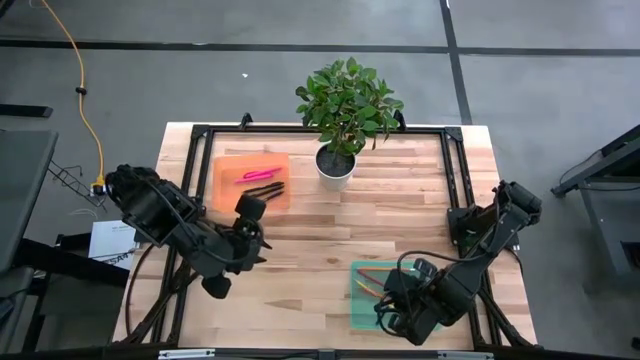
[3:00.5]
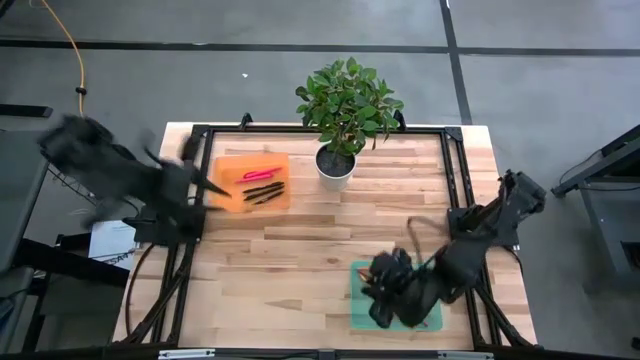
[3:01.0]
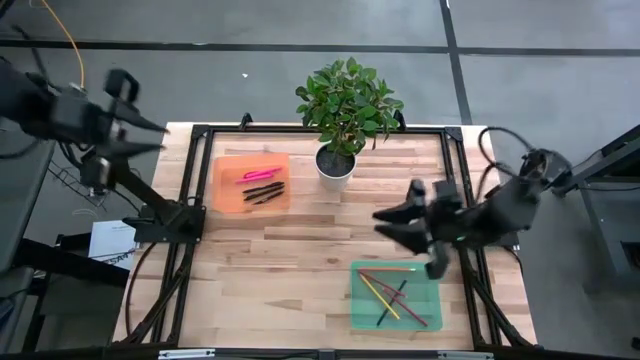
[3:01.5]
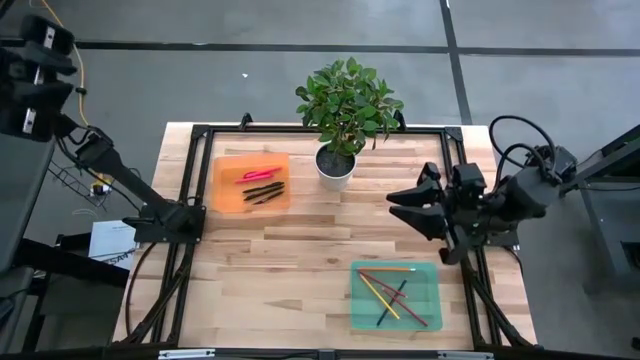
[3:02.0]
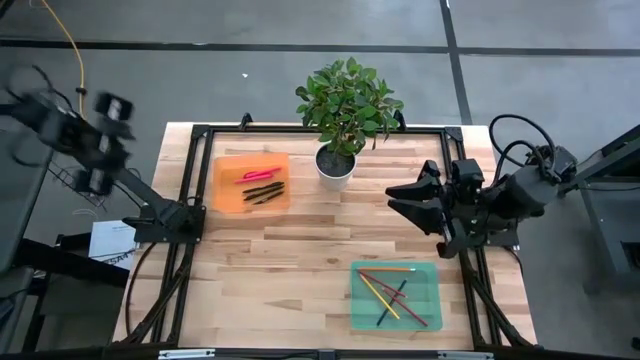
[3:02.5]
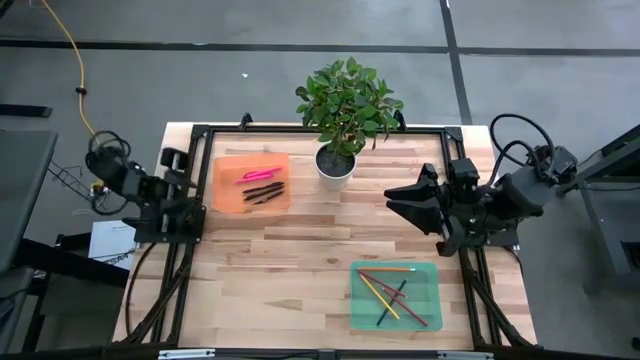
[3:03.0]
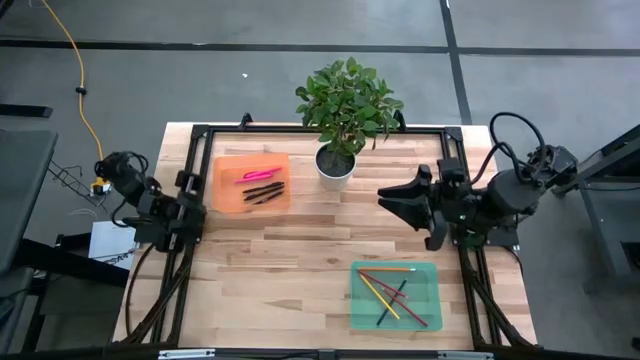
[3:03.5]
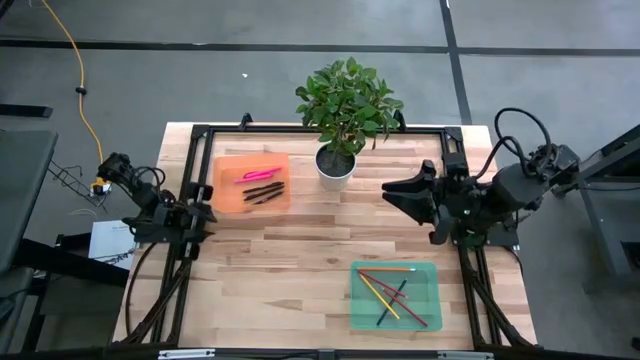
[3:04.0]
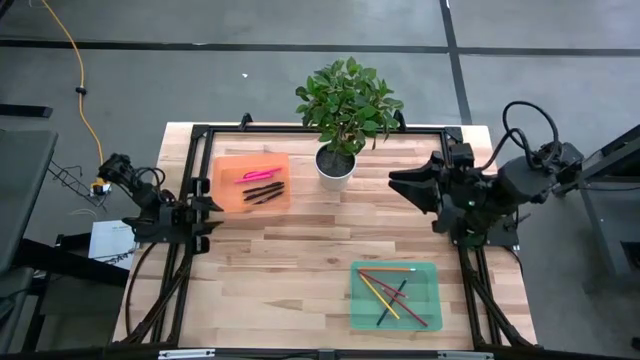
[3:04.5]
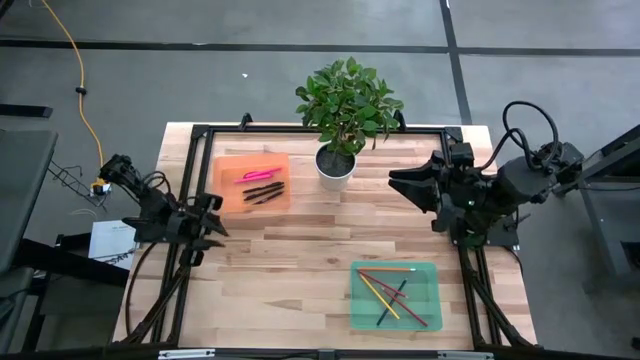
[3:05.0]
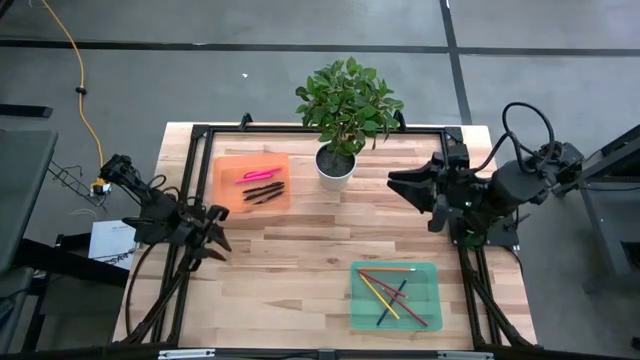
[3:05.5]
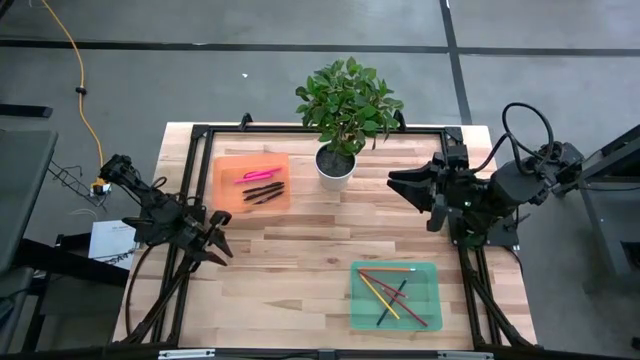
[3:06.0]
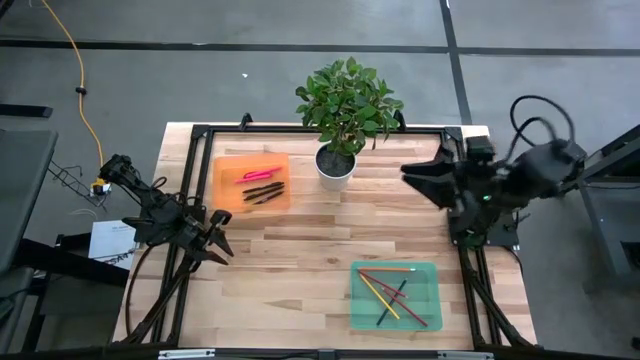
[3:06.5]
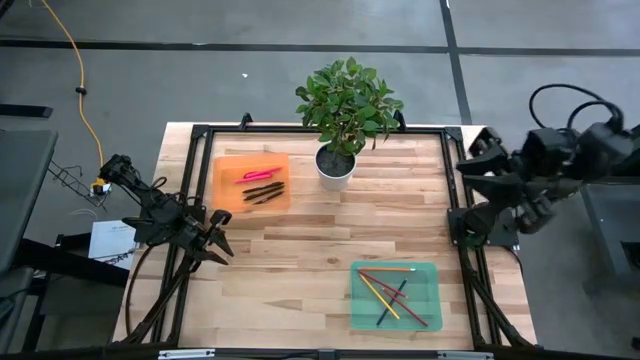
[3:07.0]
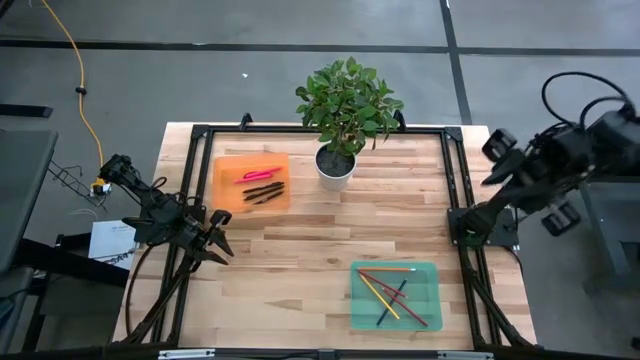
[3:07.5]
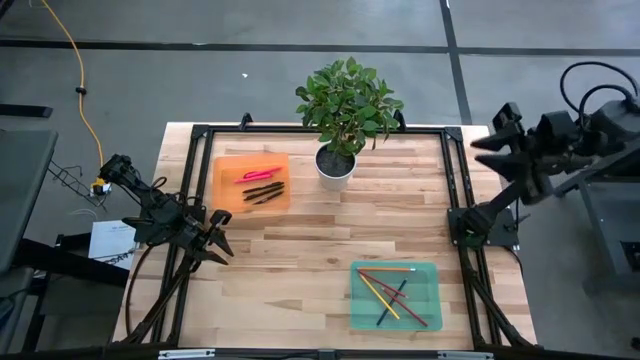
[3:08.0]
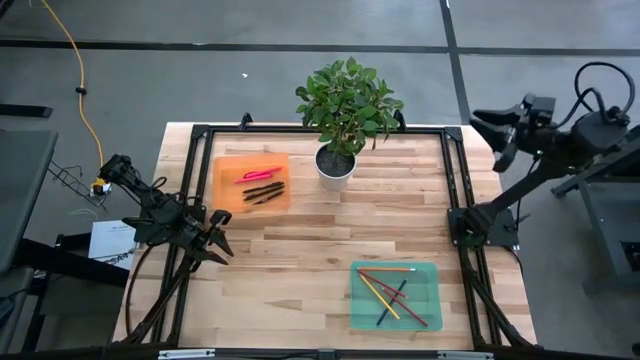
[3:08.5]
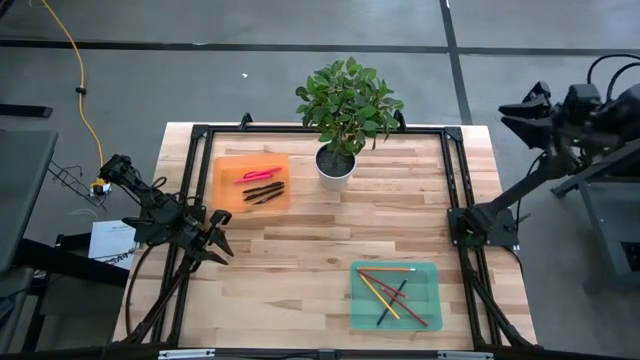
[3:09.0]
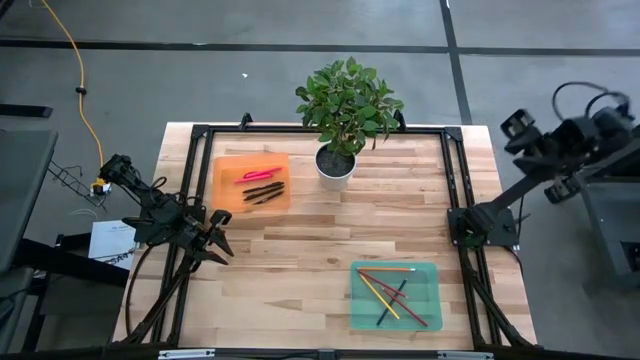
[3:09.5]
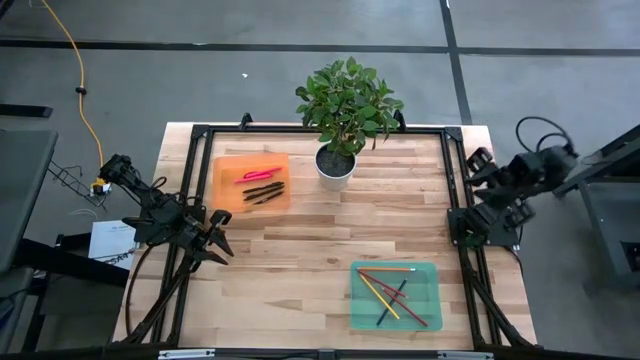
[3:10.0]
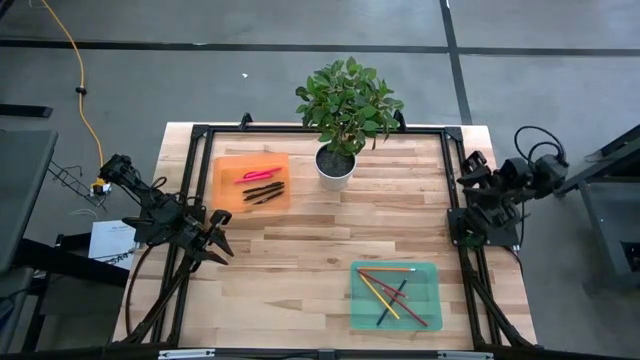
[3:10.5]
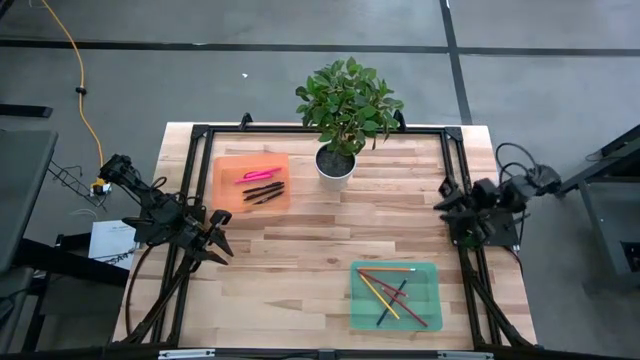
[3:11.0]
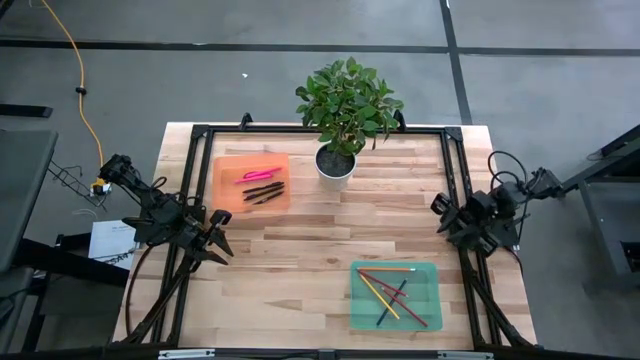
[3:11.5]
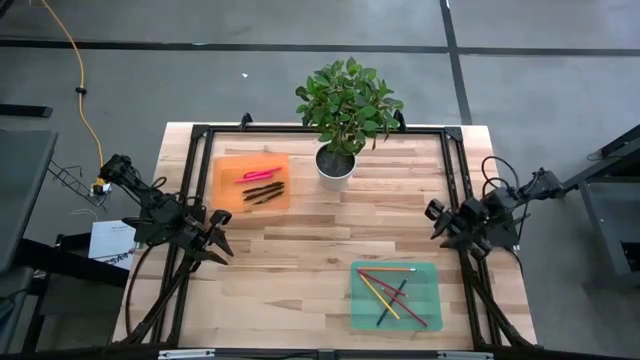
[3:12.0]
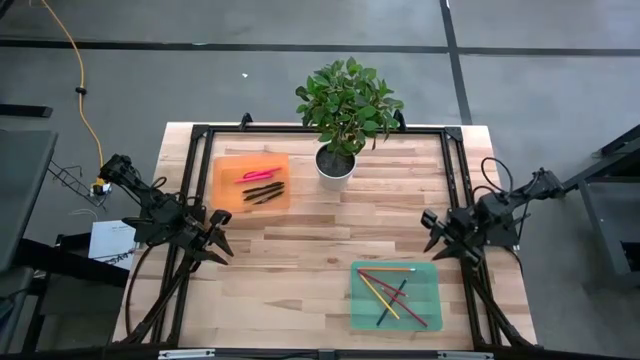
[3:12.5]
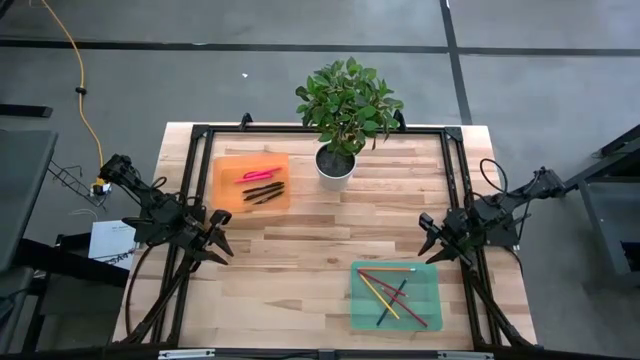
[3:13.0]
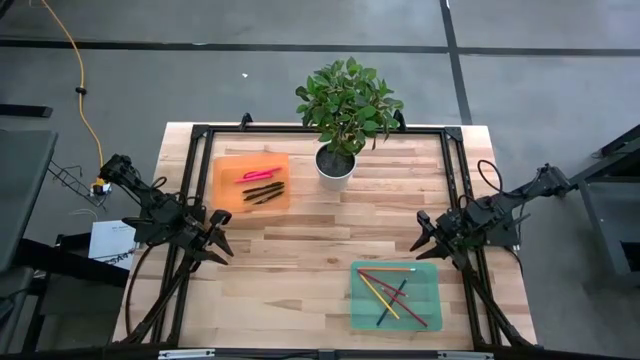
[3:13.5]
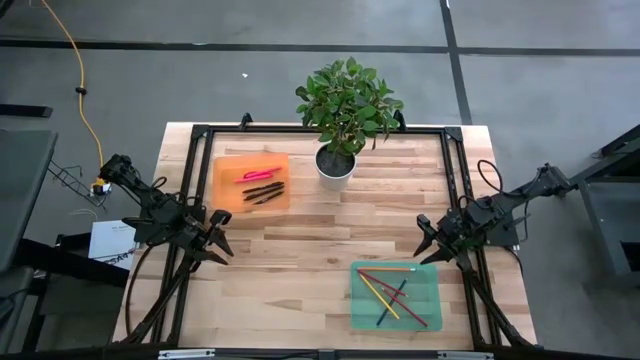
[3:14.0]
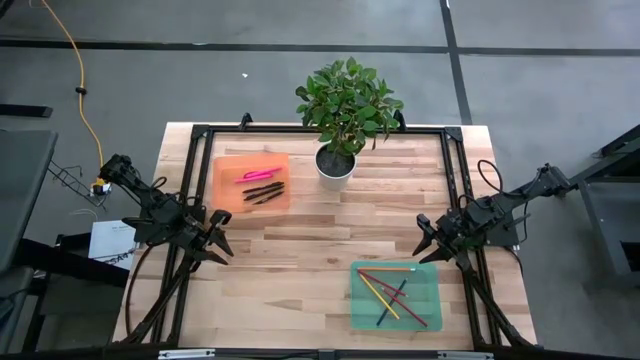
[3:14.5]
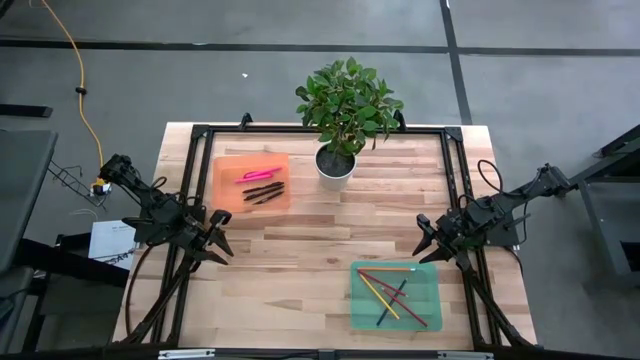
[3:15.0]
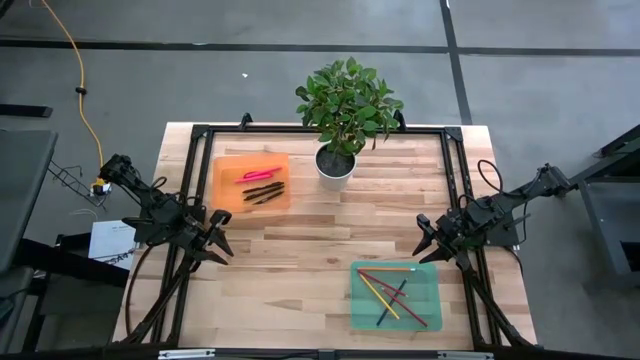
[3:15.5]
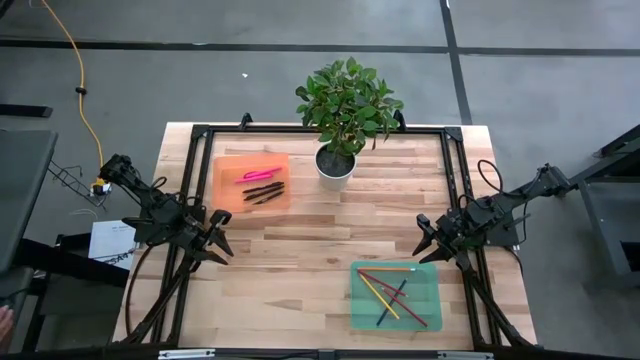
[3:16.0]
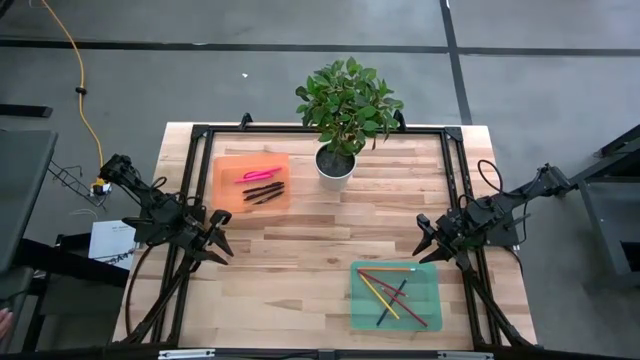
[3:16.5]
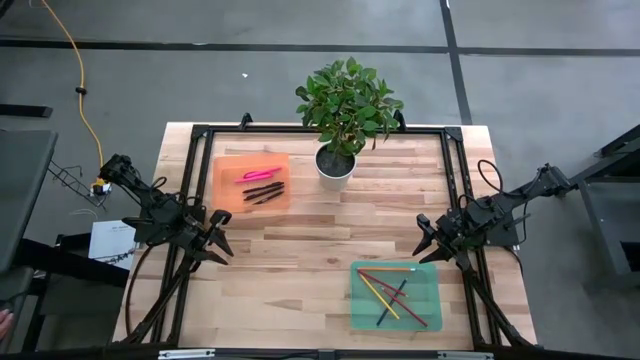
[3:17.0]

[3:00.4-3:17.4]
Task: Sort pens & pencils
Return to Home Position
